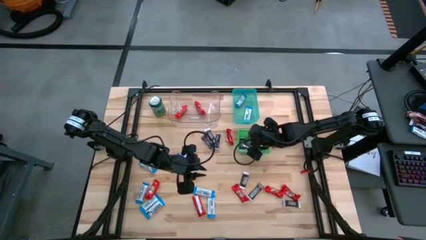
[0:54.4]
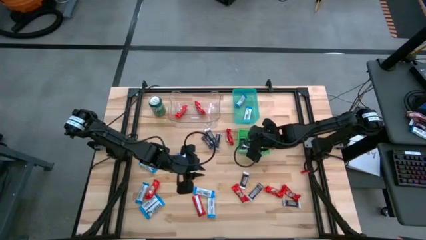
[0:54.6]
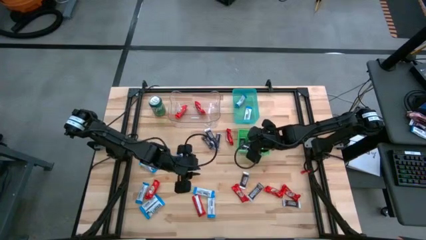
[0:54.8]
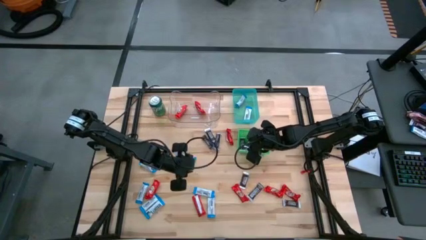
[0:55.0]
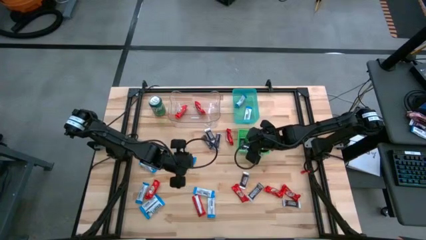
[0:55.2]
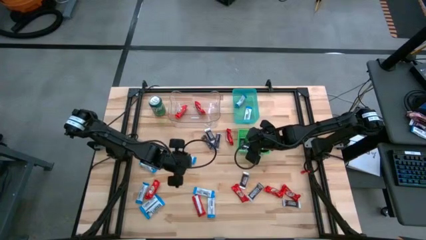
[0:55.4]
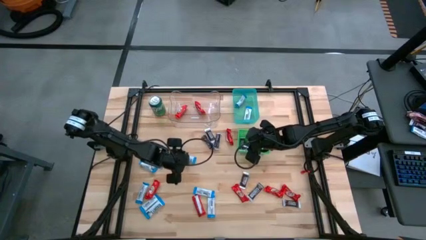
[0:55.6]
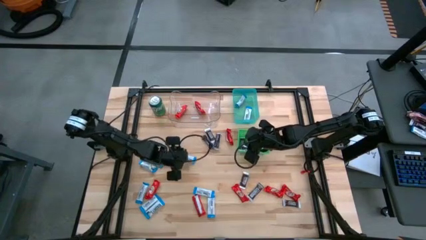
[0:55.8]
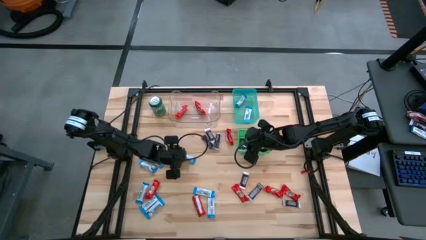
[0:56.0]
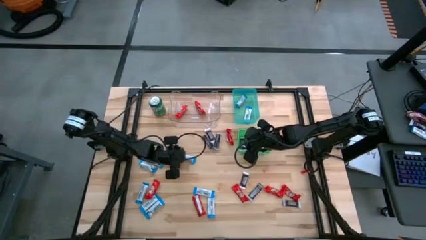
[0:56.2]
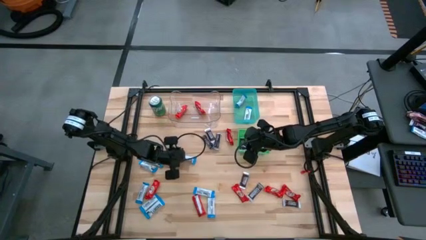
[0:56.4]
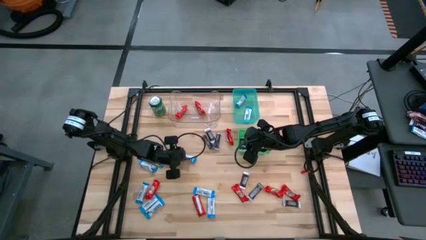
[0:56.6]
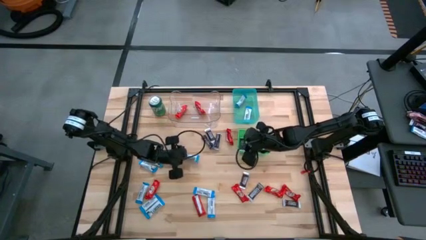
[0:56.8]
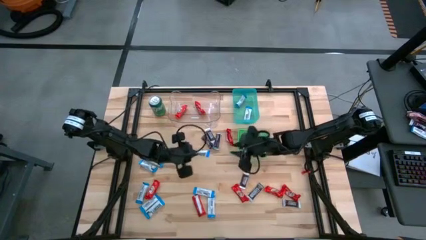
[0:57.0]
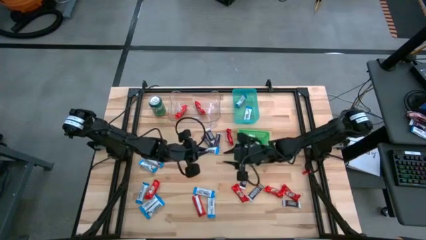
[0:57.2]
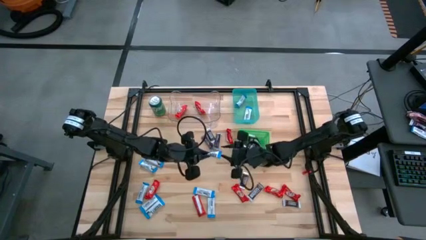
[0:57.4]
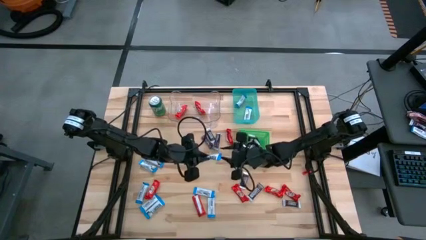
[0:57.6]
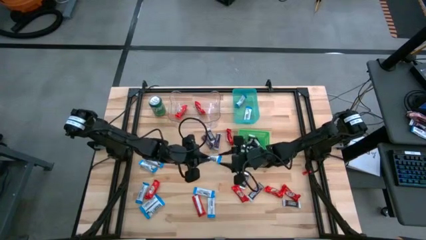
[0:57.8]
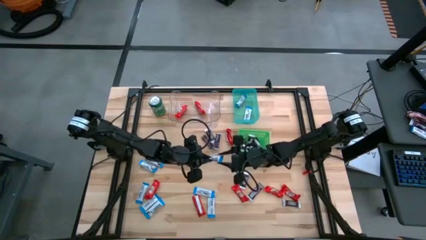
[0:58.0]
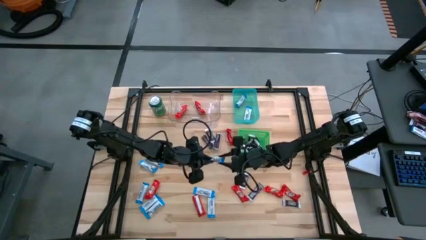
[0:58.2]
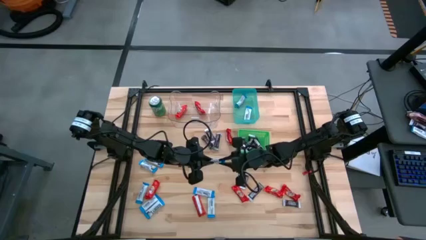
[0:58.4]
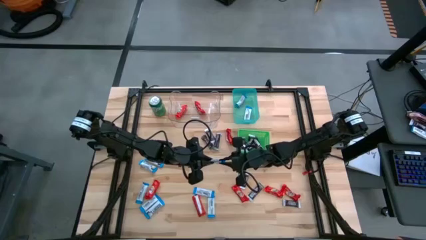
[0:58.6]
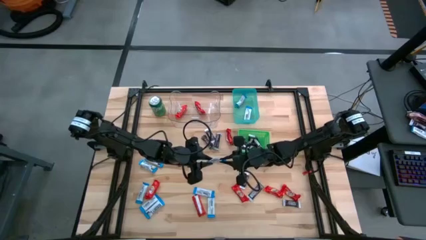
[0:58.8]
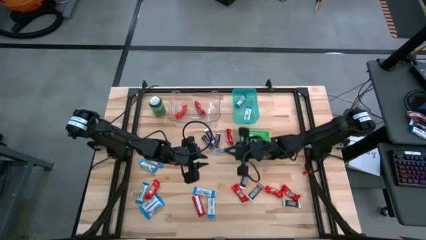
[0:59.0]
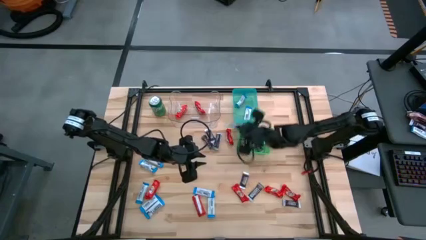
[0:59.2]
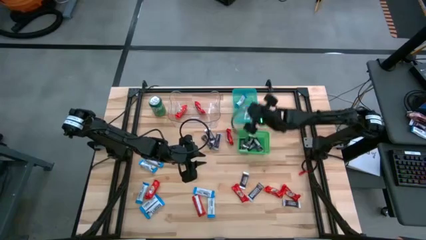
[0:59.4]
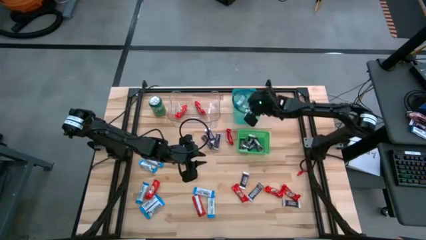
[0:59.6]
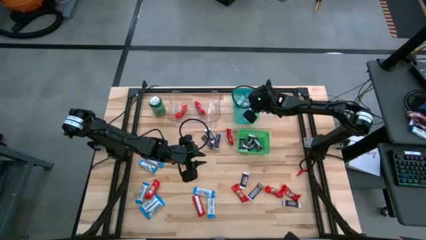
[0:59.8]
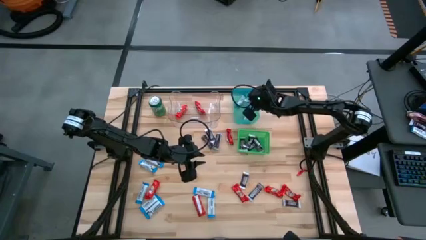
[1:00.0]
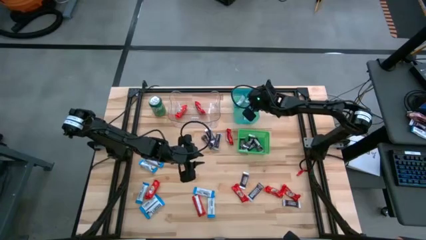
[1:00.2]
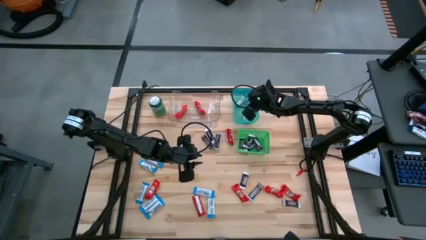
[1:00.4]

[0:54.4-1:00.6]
Task: Sort candy
Put the white chocolate bar into the blue bin

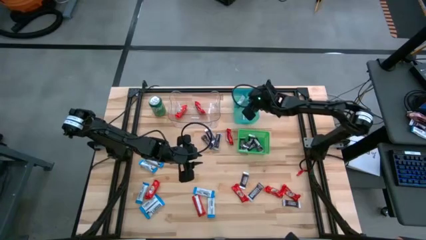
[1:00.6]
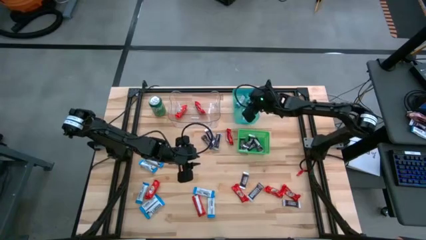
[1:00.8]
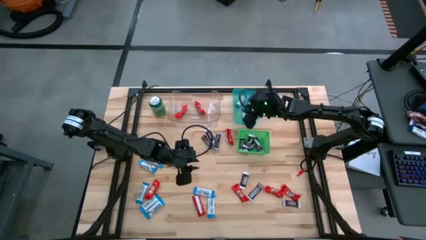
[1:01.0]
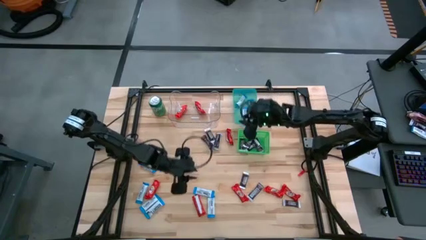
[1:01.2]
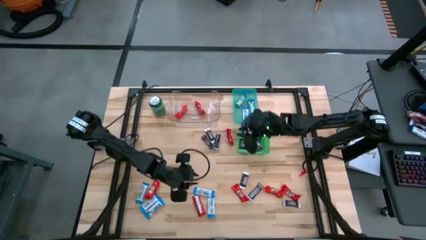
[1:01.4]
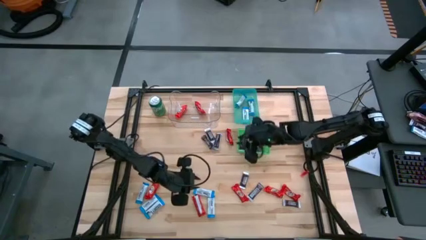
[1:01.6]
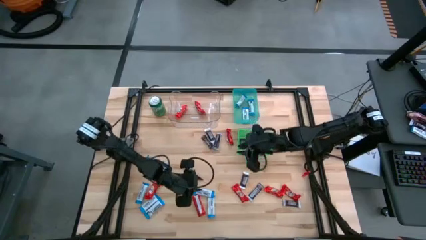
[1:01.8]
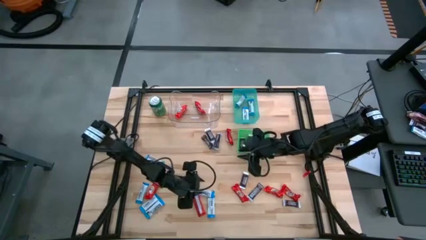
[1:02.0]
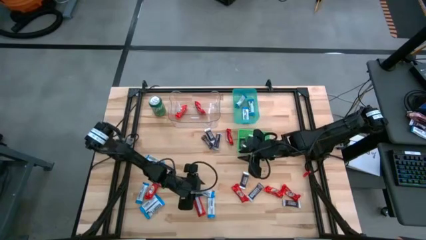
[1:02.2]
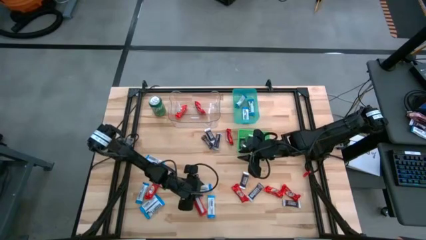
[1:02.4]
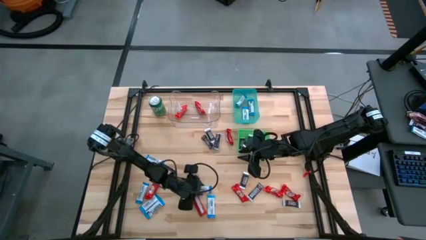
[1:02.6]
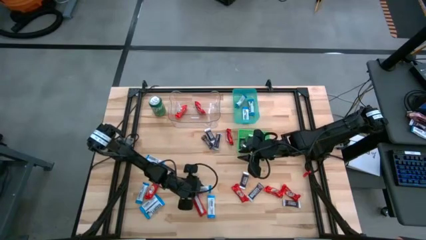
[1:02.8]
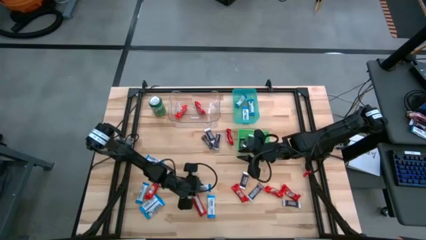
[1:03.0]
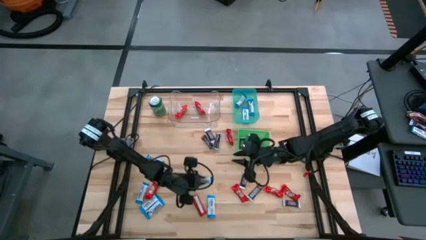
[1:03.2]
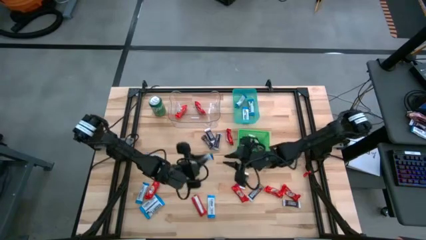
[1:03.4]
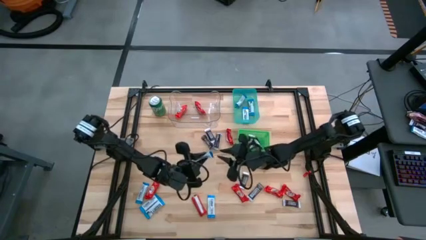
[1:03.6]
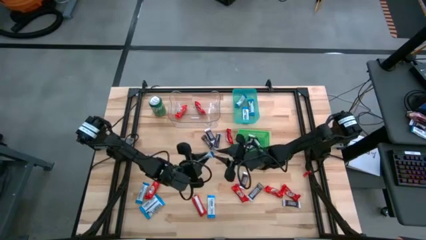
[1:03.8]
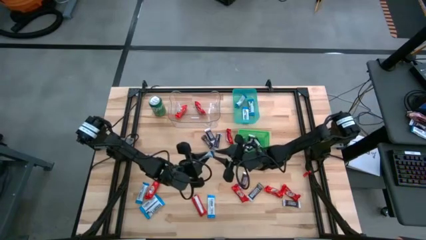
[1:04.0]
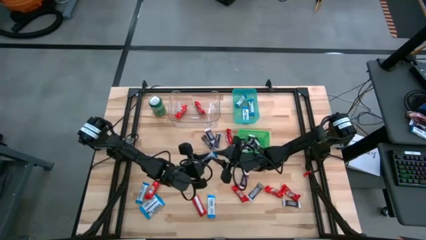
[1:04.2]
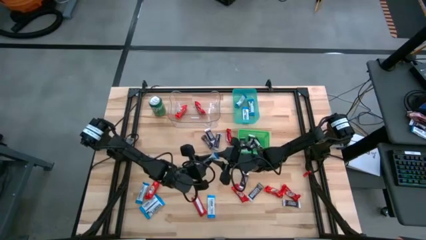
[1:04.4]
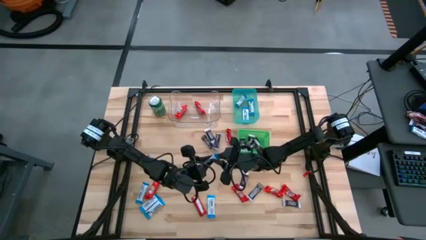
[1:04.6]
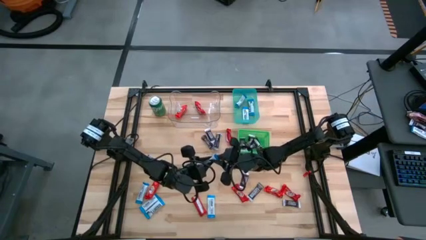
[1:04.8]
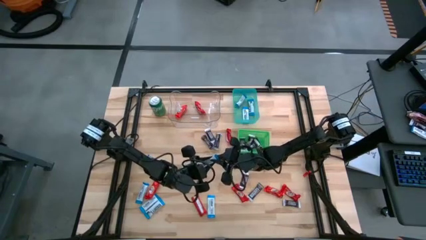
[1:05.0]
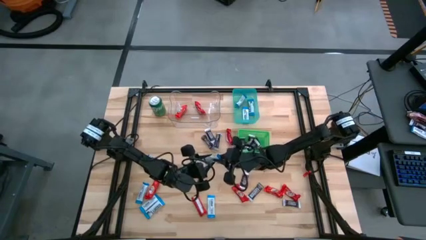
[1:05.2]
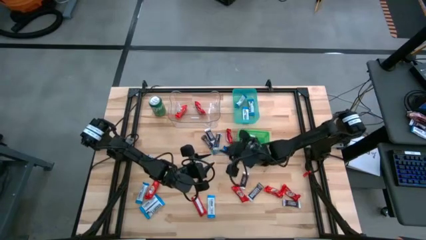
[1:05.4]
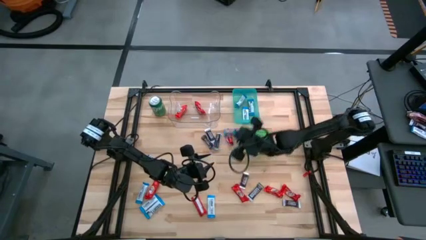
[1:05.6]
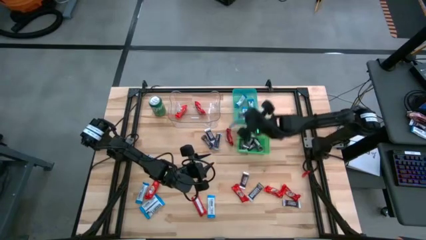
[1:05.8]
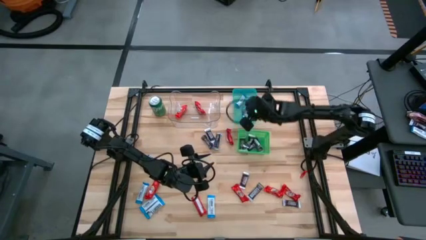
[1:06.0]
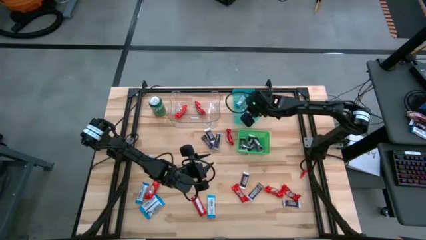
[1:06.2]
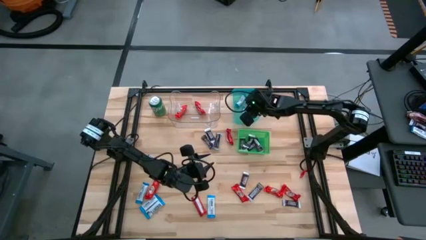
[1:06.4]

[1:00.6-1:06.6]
Put the white chocolate bar into the blue bin

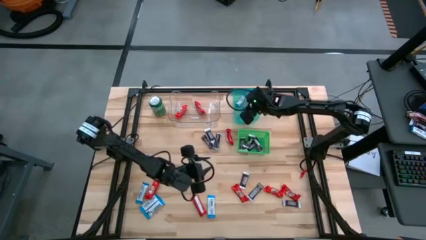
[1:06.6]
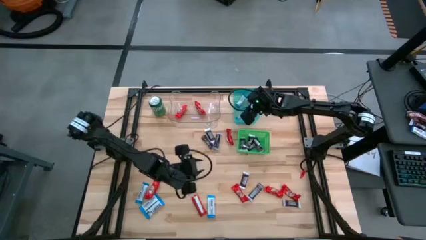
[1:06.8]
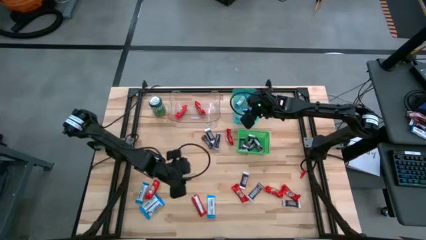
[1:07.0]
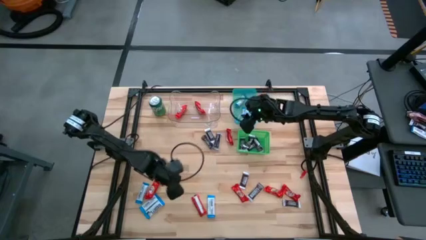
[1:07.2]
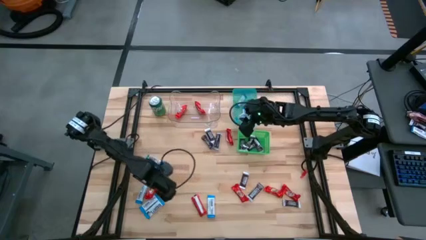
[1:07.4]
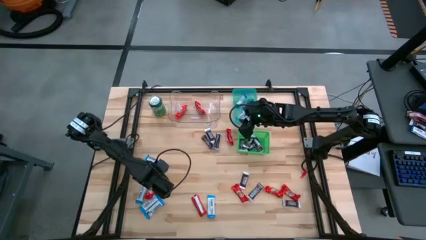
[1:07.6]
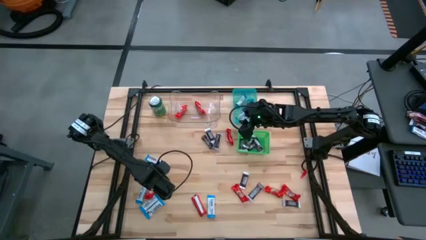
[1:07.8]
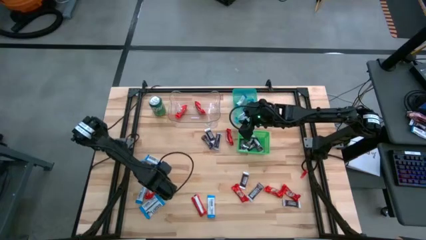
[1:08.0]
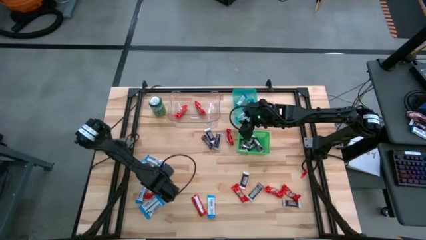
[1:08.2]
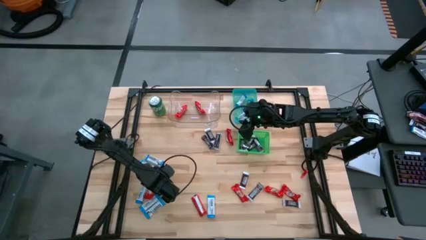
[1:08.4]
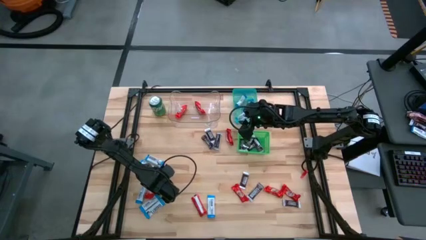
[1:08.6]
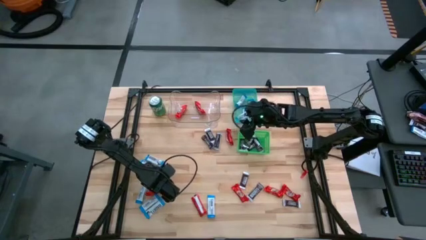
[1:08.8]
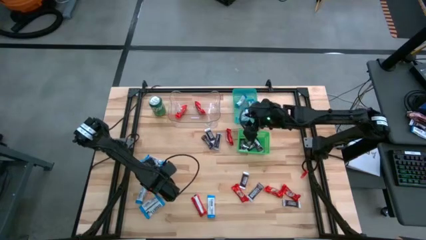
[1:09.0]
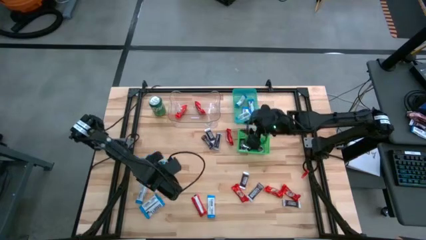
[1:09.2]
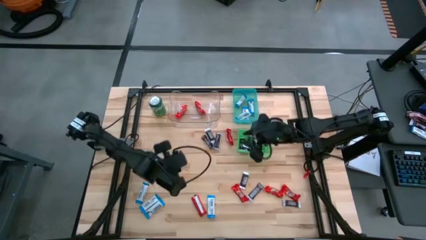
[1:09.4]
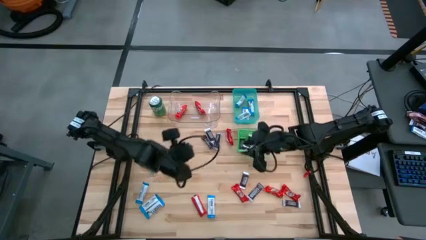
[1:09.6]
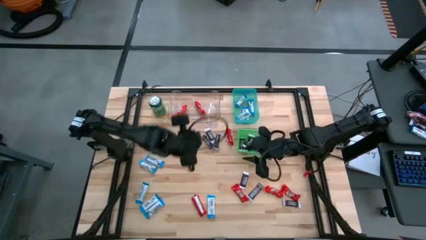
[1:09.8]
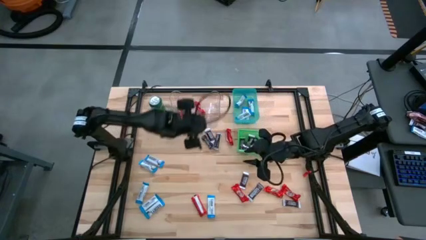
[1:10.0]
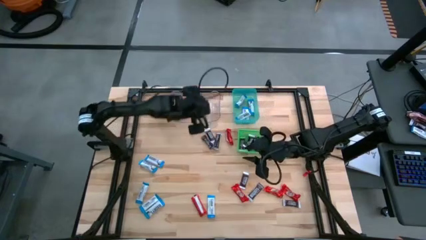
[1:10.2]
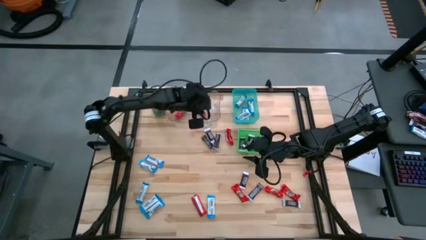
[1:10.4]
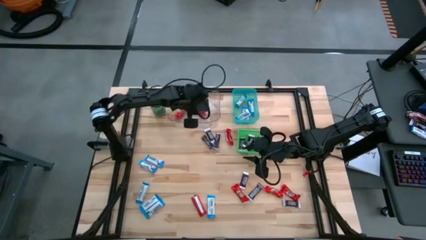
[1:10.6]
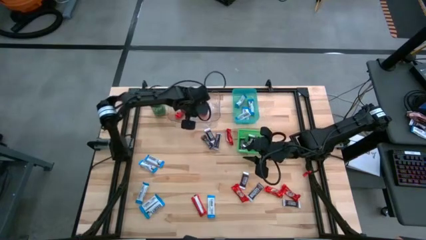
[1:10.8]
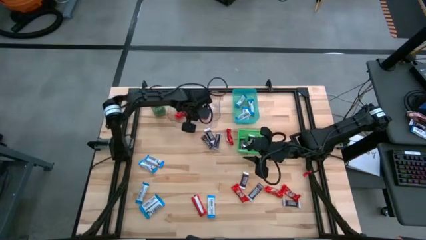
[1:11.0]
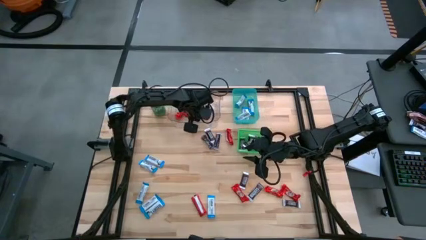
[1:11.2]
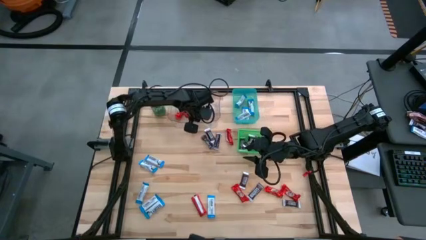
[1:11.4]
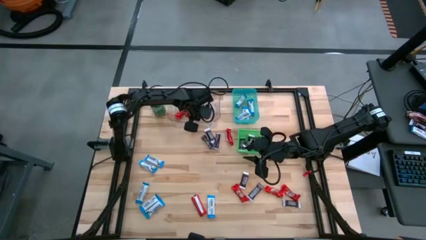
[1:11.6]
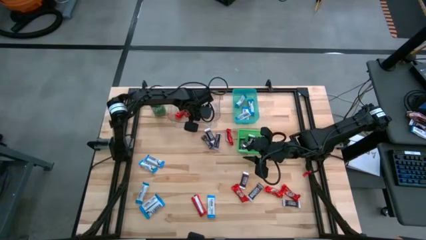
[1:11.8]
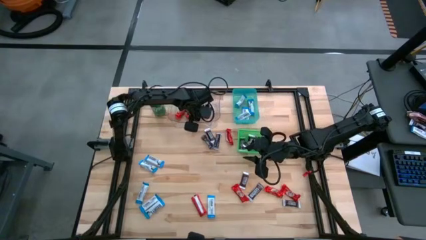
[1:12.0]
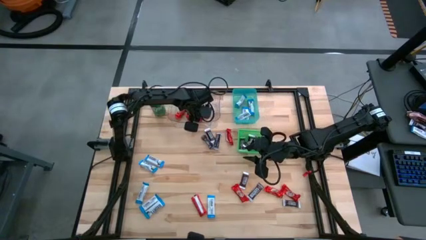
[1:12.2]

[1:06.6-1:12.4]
Put the red chocolate bar into the transparent bin
